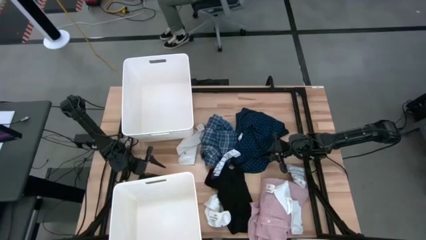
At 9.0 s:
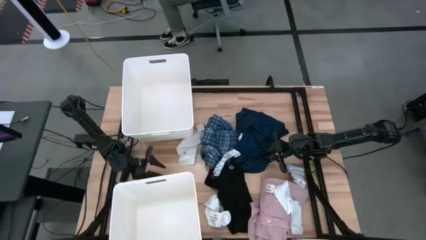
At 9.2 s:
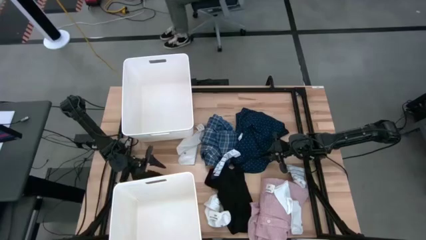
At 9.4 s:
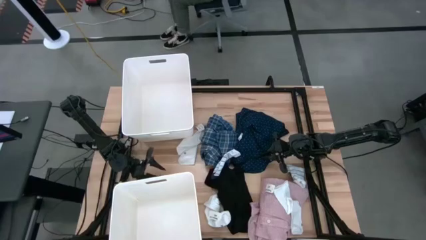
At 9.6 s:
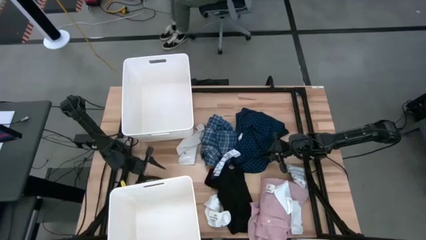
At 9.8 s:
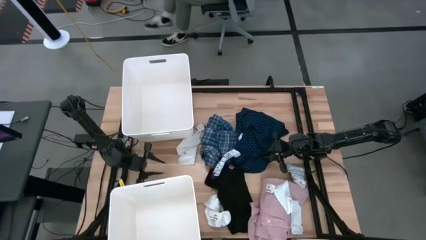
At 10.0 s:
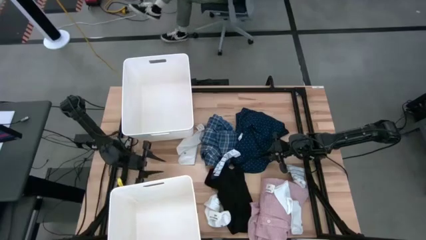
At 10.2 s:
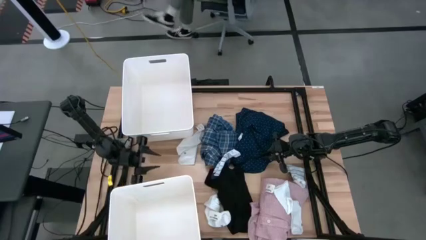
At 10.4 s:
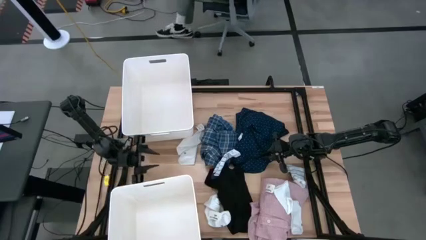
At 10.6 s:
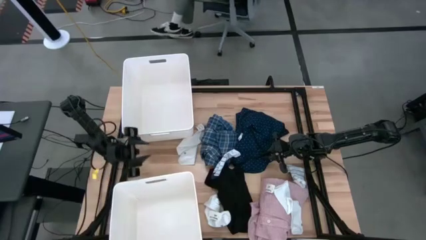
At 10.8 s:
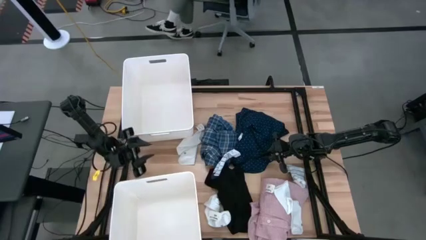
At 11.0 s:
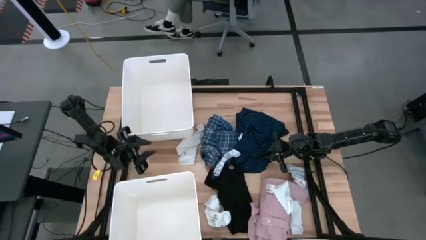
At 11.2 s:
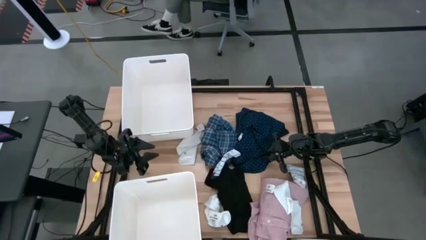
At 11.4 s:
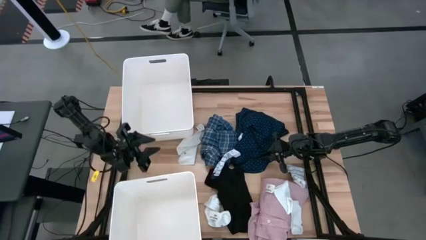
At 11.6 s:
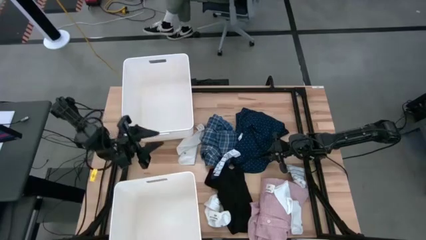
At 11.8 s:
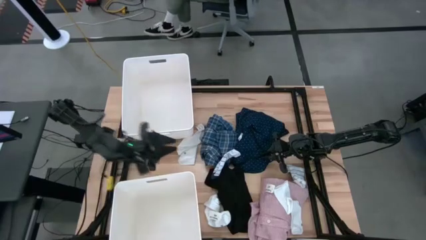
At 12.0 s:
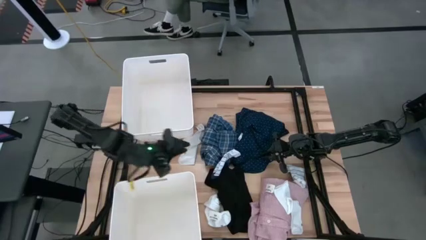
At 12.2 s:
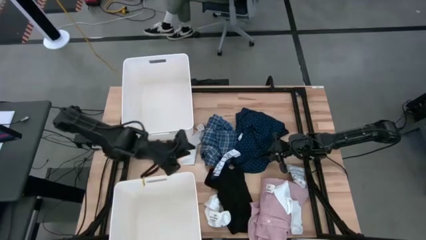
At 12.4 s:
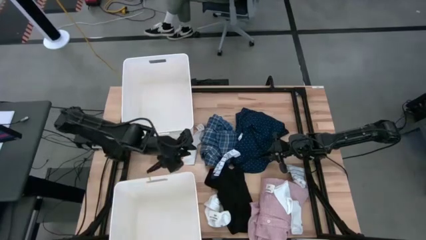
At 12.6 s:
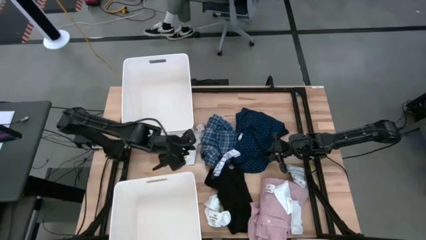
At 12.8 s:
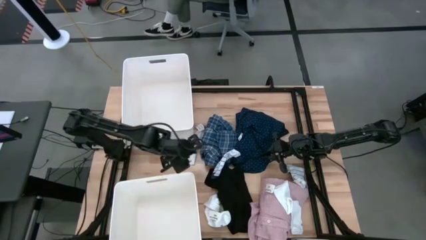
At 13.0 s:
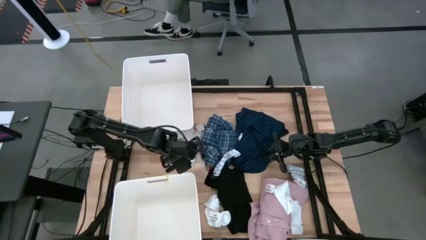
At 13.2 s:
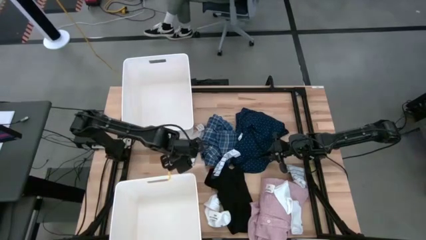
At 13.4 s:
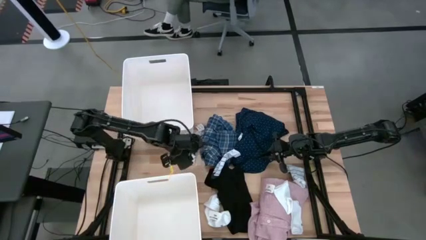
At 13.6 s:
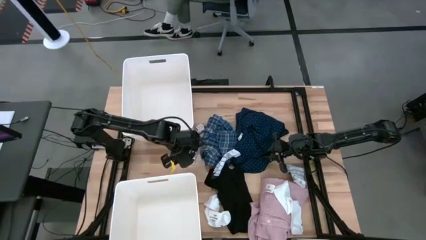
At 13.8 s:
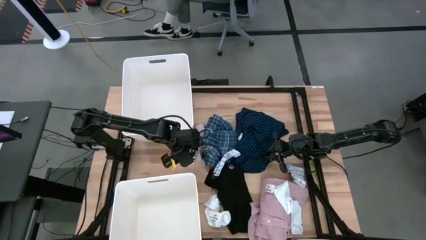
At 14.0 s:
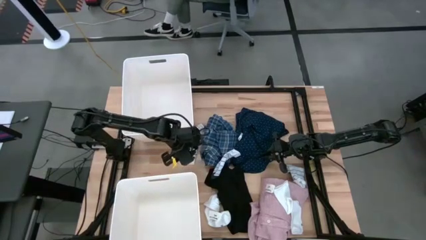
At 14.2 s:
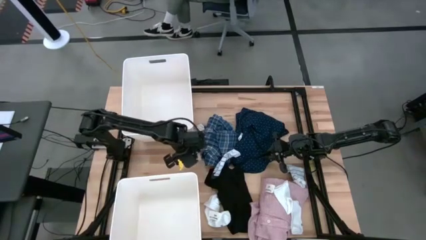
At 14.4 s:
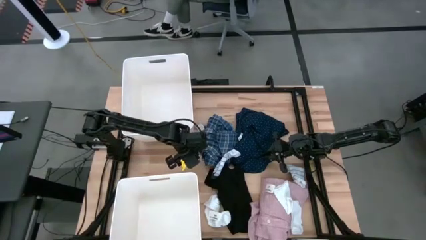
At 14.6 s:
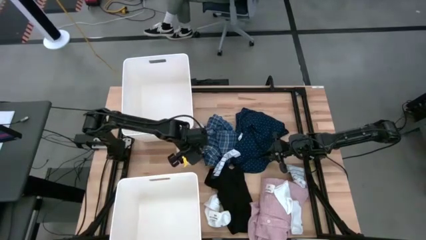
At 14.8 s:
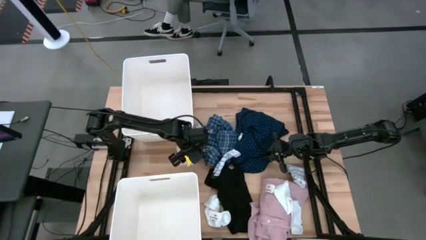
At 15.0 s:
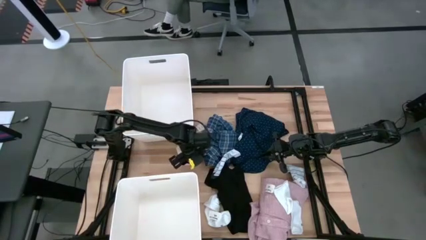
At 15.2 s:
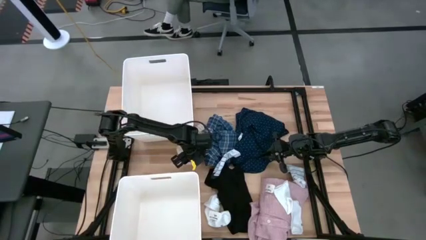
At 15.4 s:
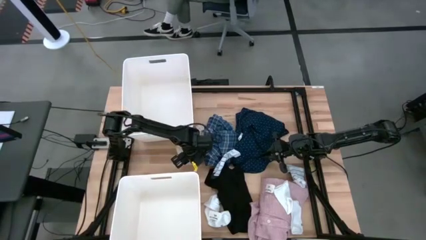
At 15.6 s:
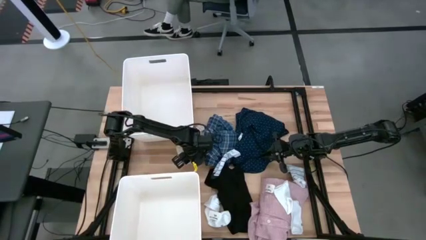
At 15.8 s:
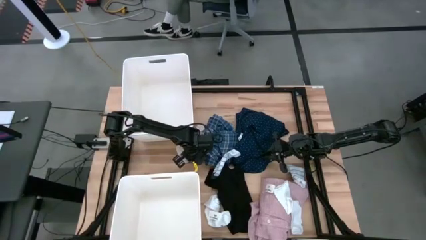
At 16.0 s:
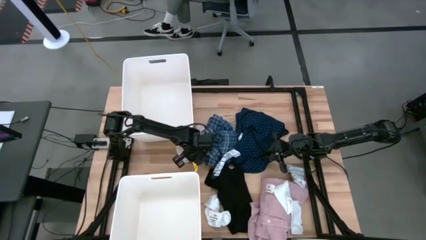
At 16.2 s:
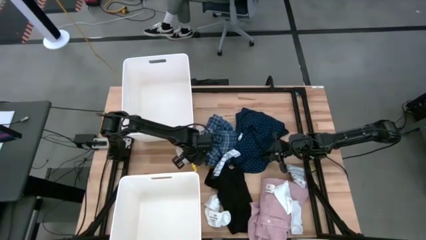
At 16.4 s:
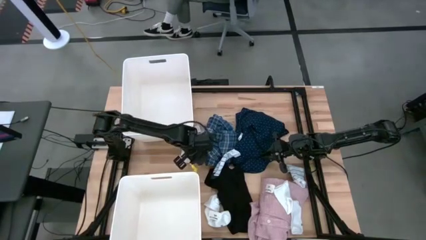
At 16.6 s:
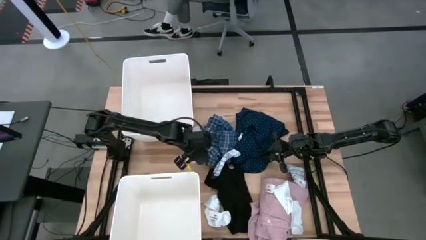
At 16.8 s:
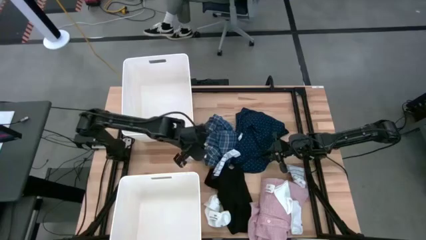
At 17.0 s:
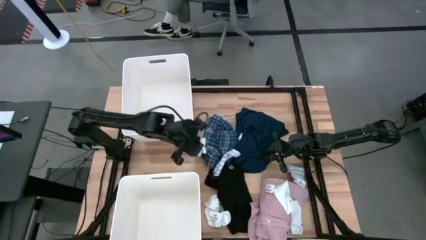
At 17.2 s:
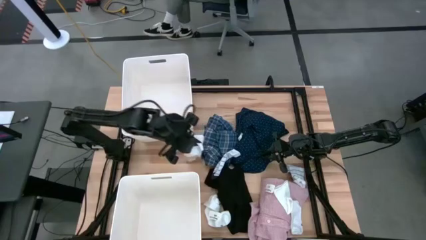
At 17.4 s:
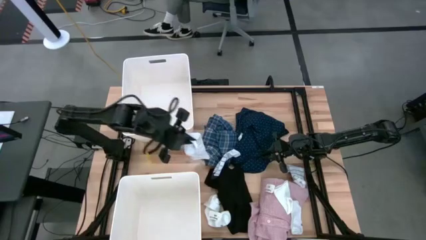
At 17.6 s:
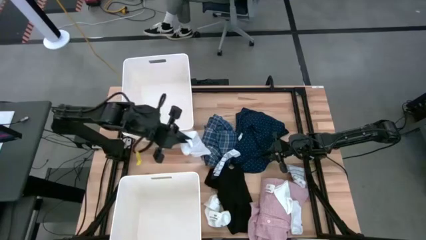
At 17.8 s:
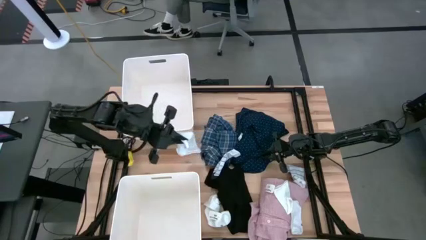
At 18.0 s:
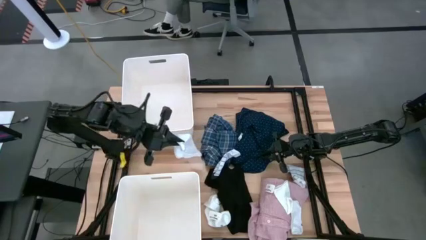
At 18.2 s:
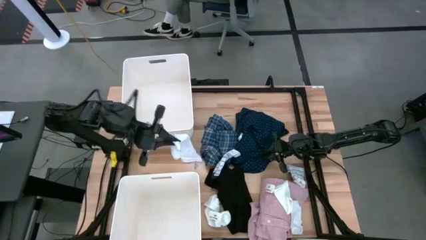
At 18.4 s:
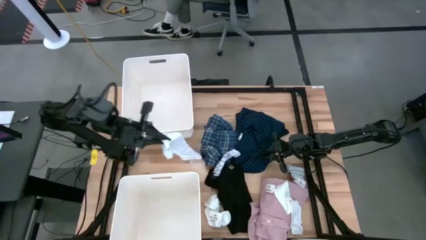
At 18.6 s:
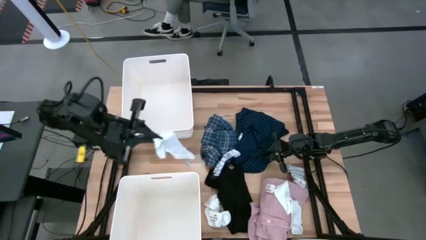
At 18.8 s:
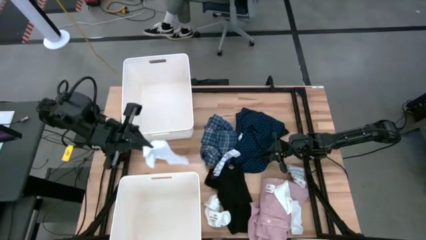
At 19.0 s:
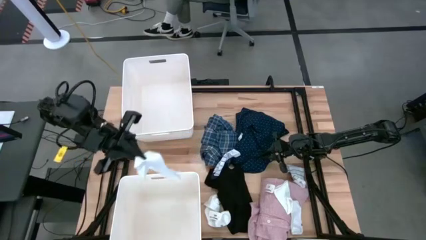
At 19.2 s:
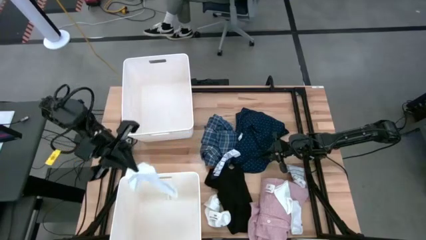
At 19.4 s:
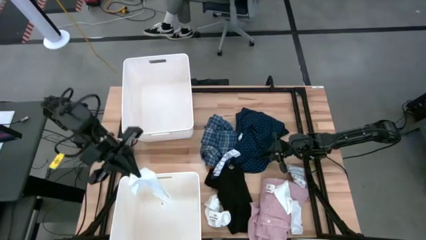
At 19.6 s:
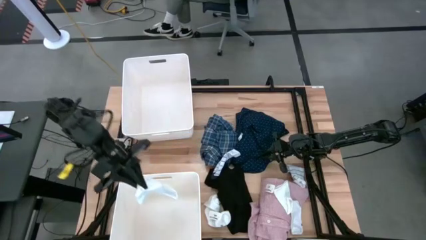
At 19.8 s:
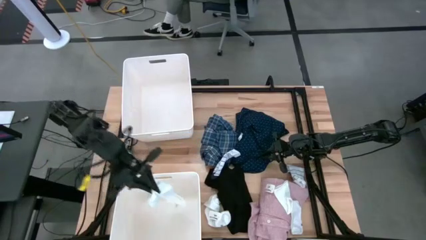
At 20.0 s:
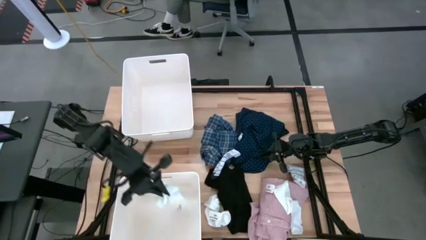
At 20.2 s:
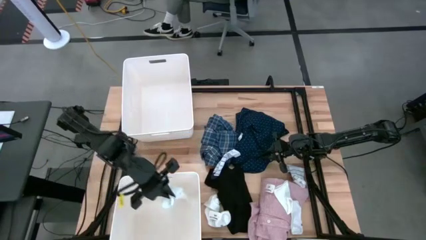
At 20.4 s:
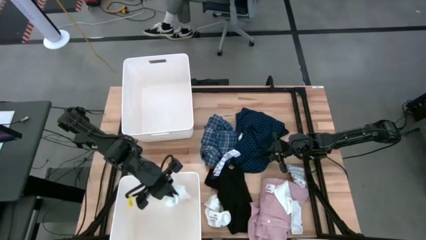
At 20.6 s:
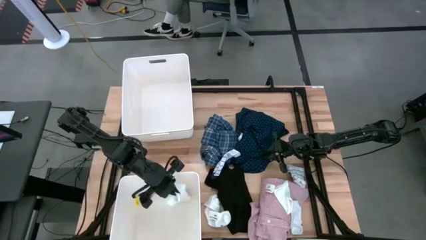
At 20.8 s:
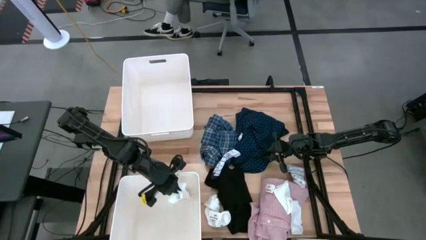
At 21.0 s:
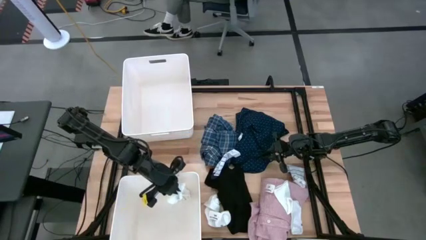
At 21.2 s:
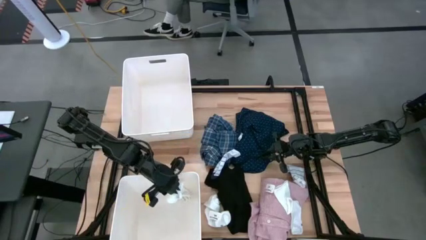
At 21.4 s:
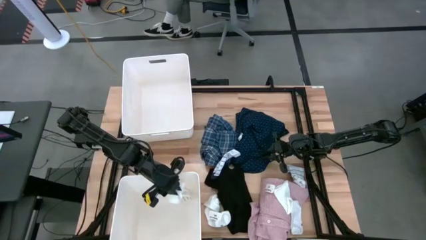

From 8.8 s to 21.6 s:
Task: Sort clothes
Put the top white sock into the bottom white laundry organizer
